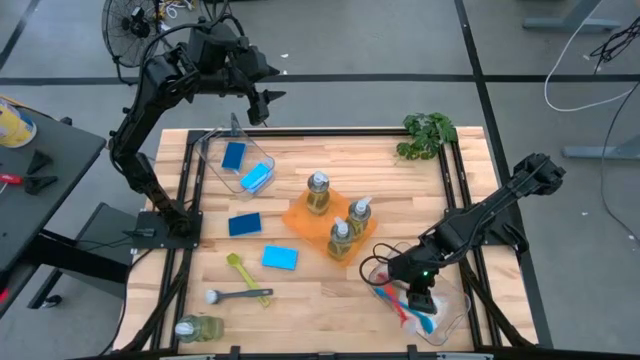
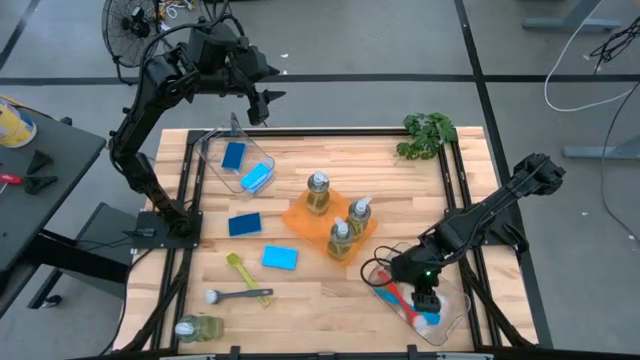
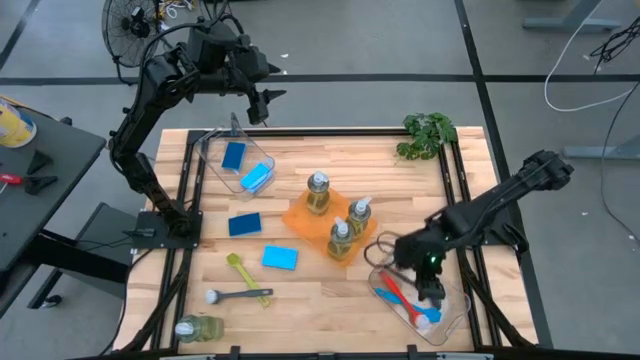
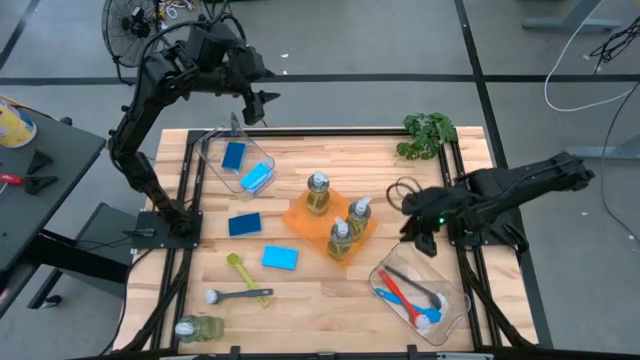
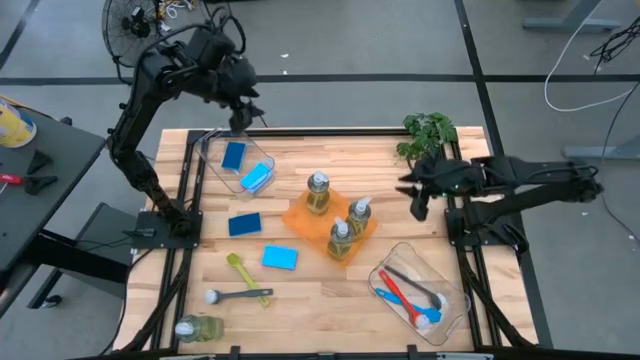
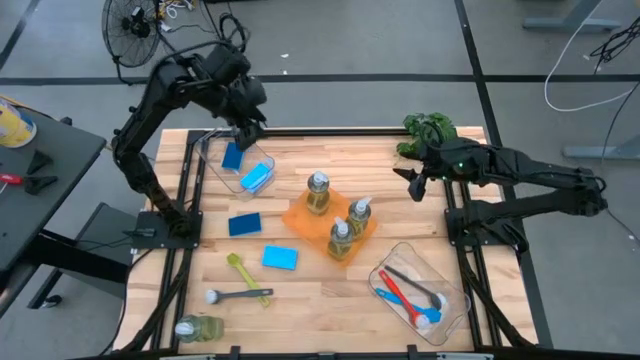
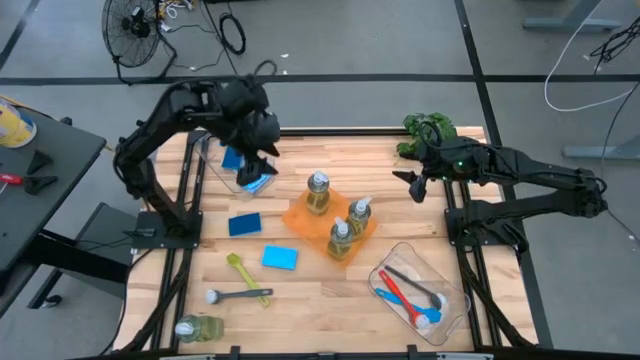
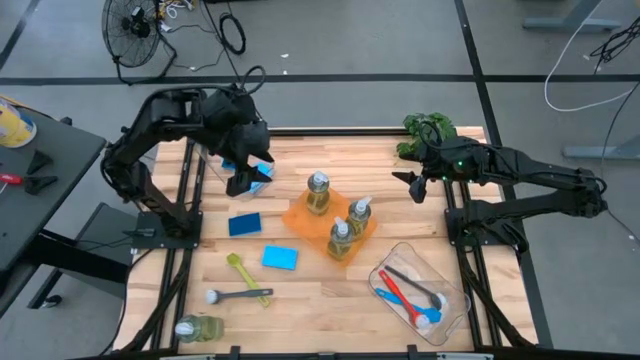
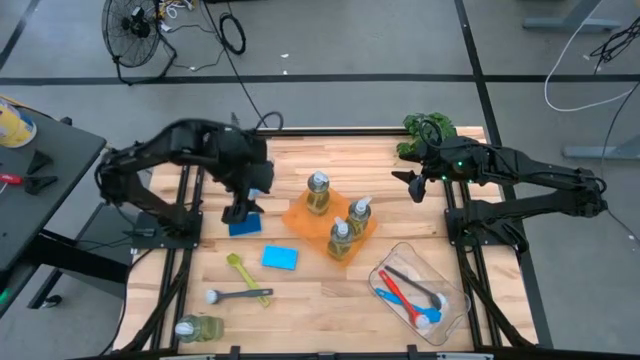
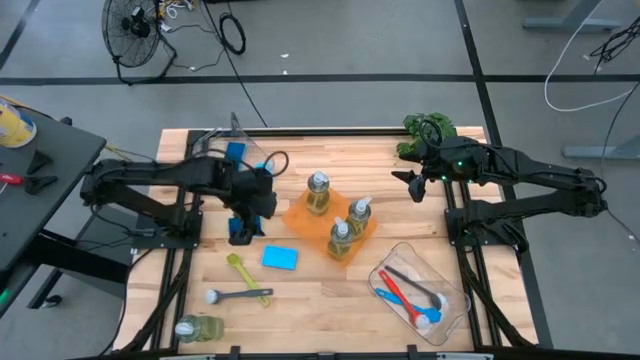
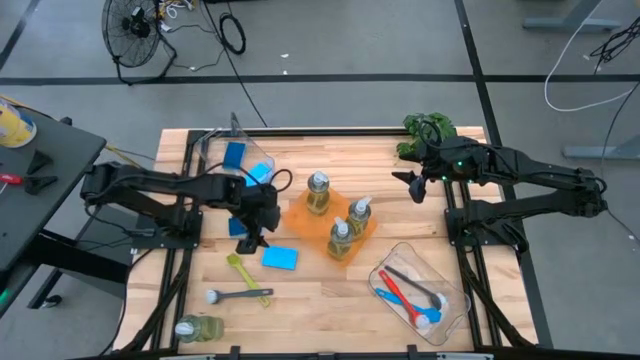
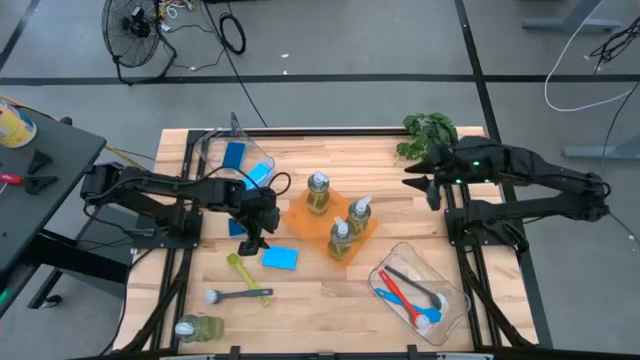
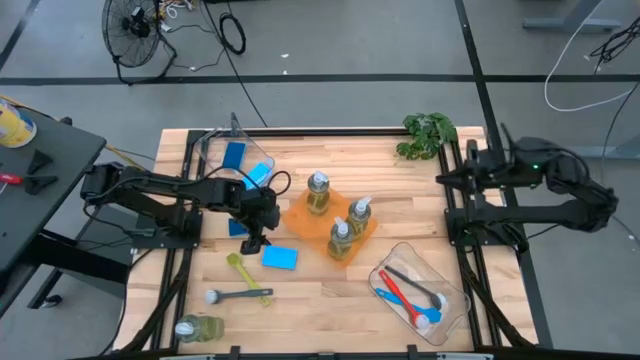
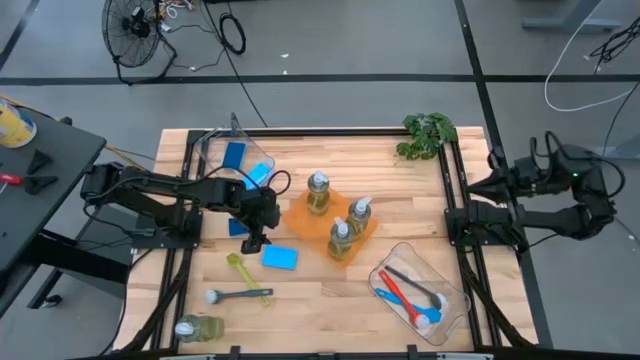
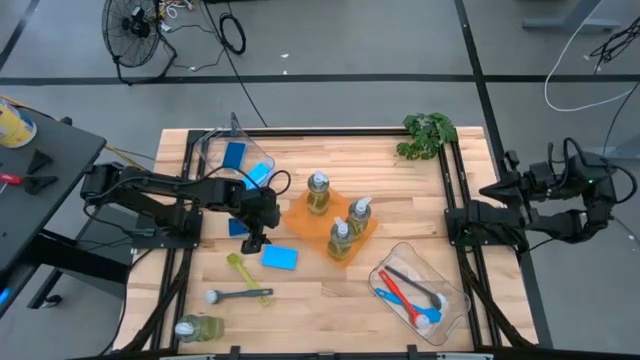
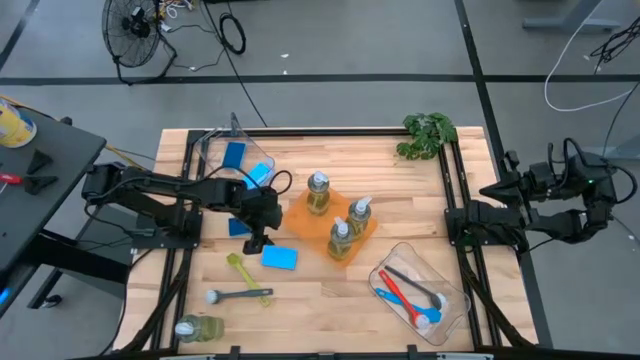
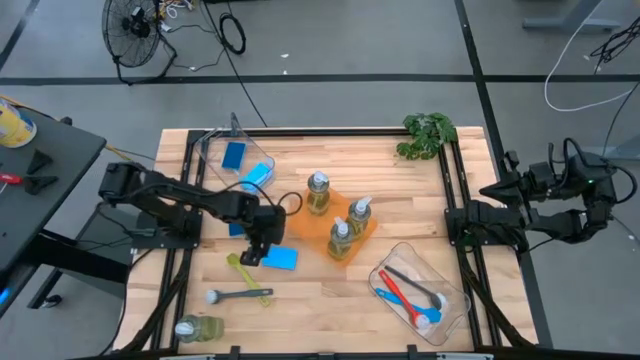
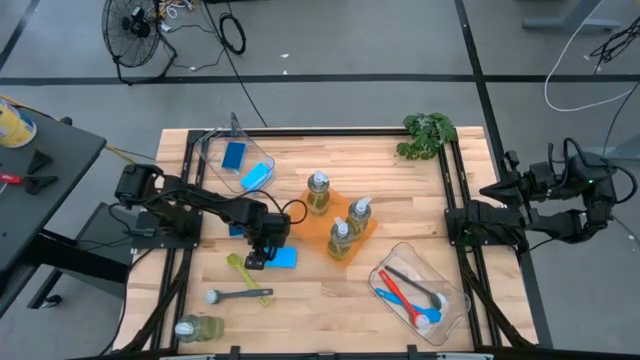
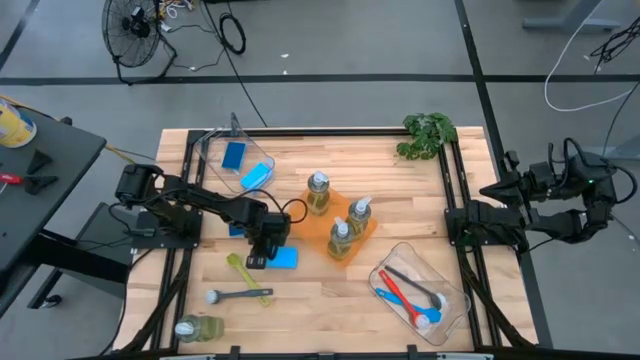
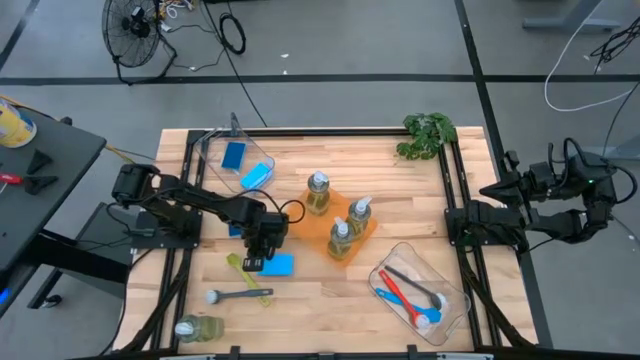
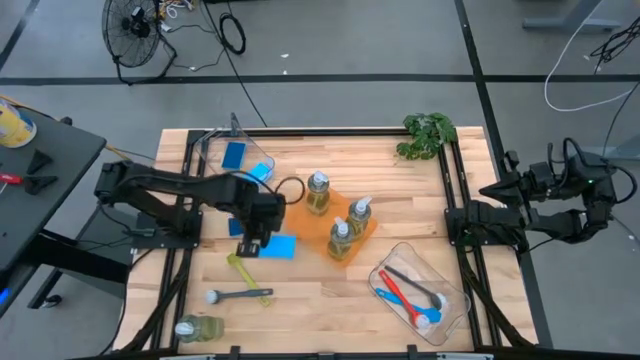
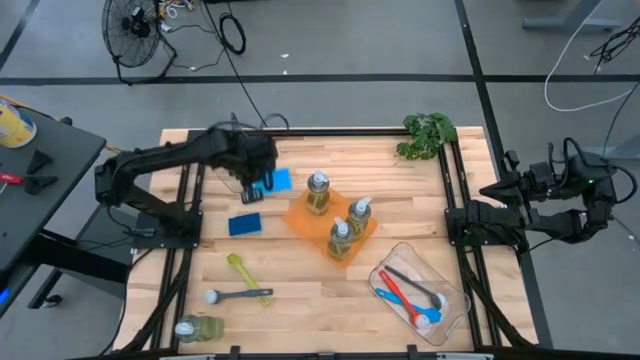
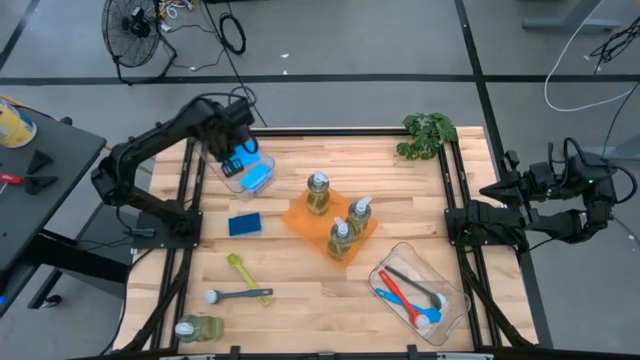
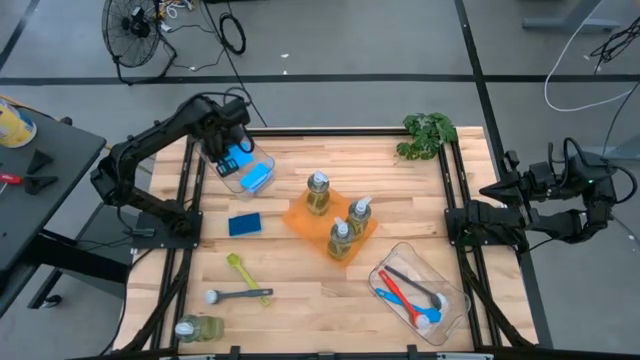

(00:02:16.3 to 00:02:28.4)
Task: Pick & Place Kitchen Sink Supplies
Put the blue sponge into the top transparent bin

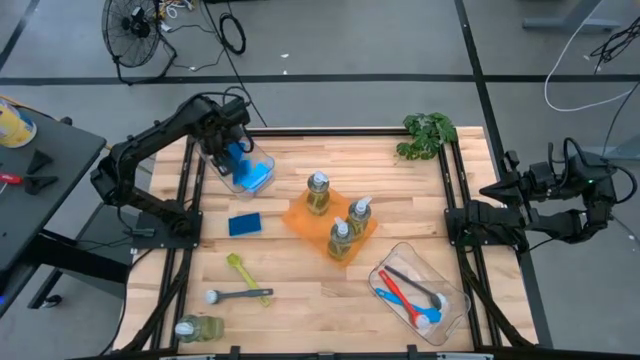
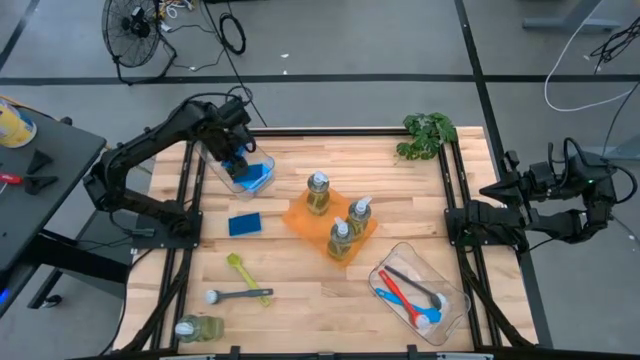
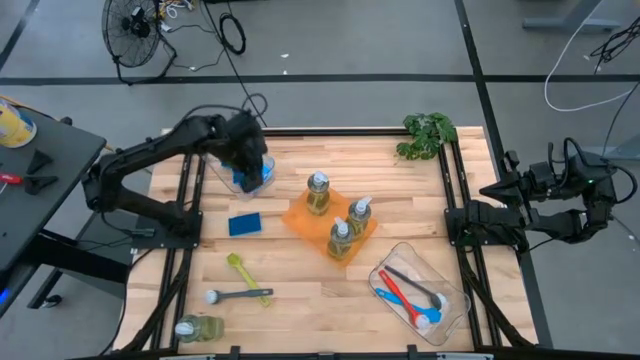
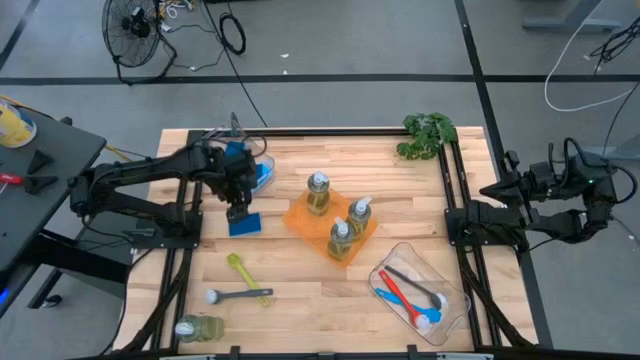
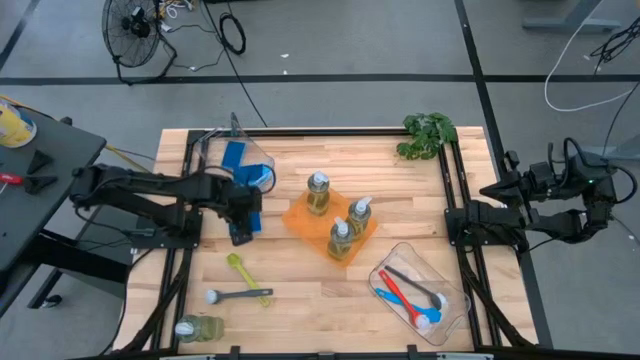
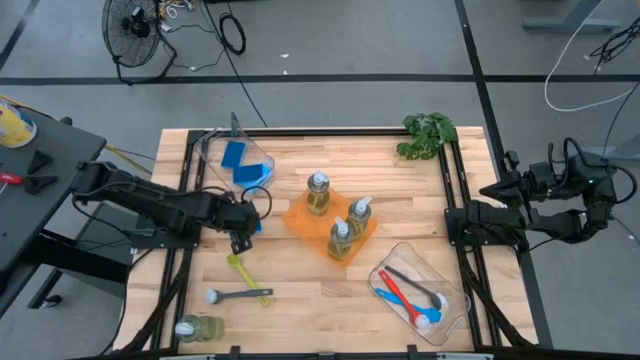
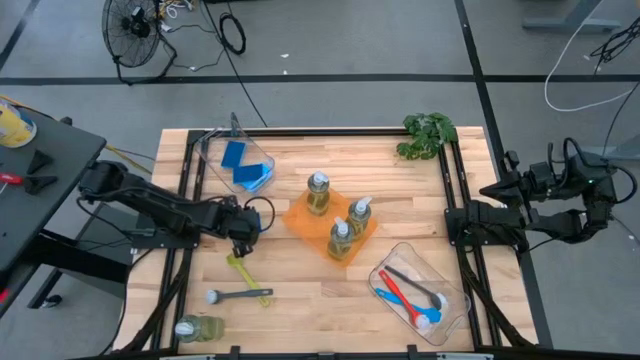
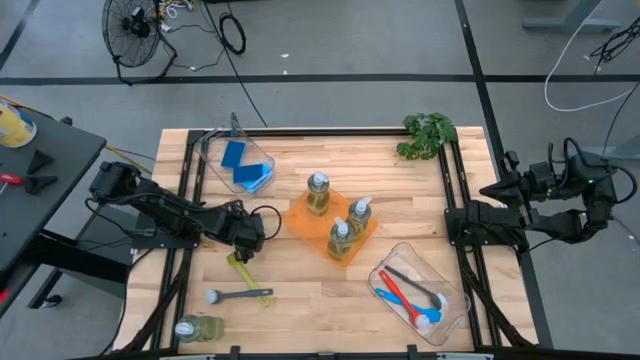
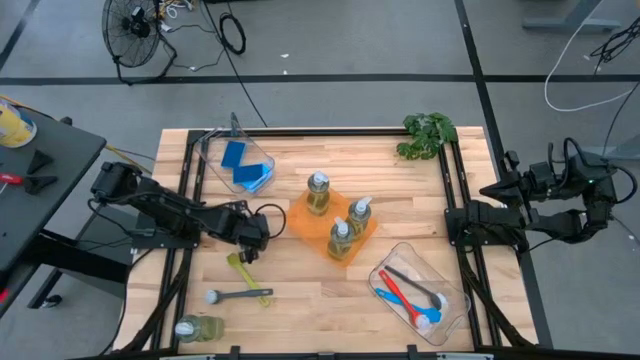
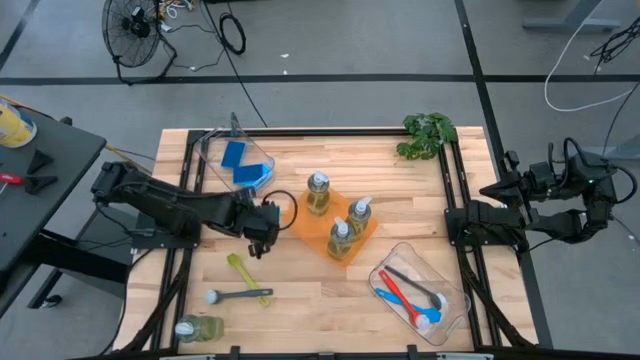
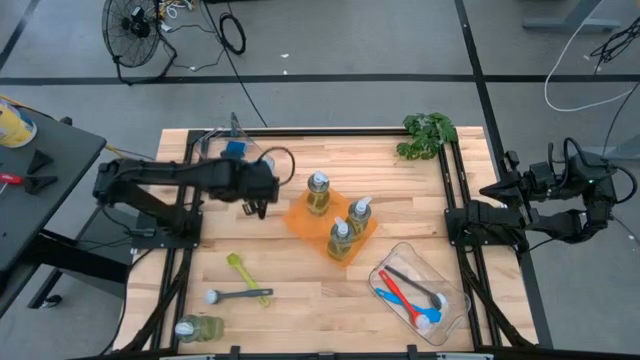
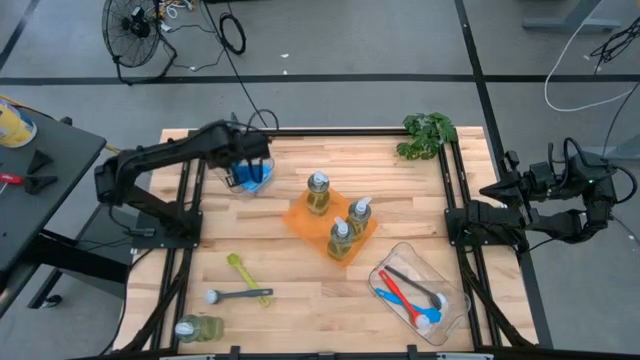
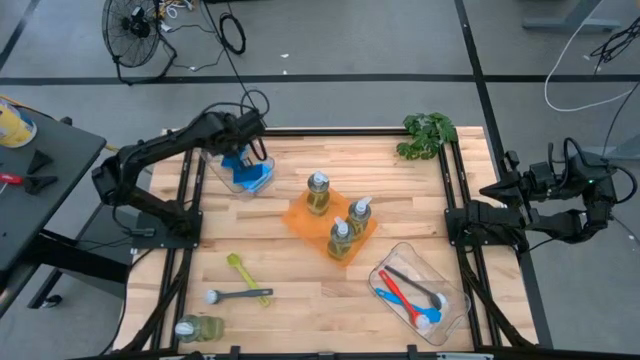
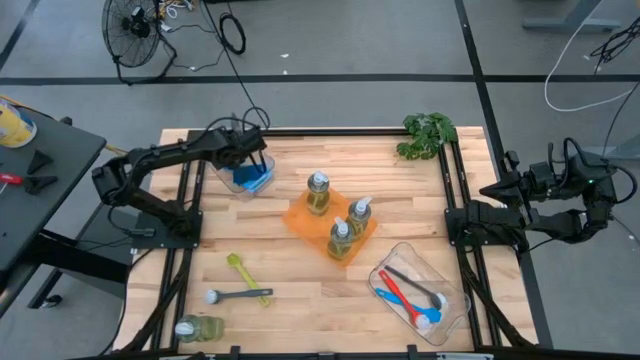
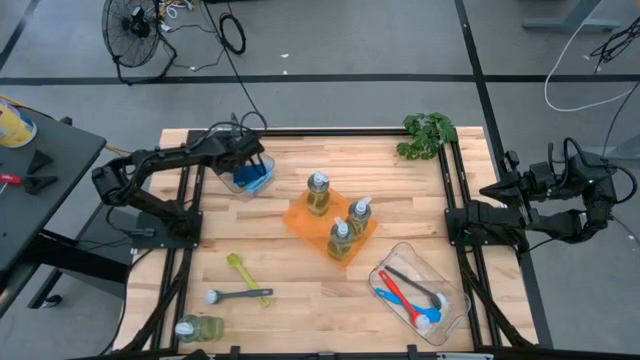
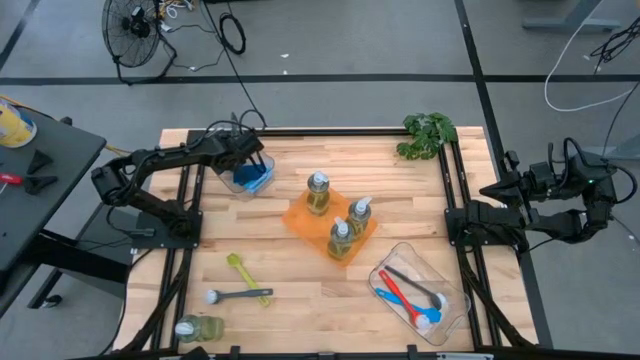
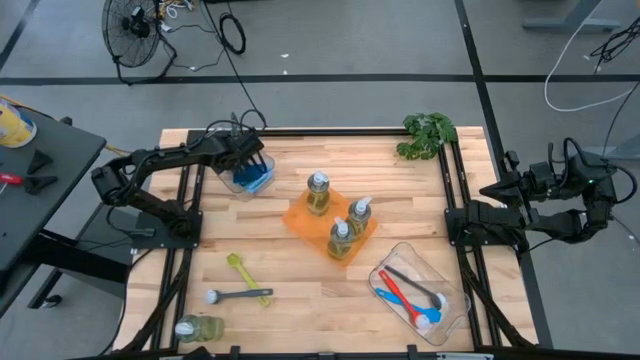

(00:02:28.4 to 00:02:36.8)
Put the blue sponge into the top transparent bin

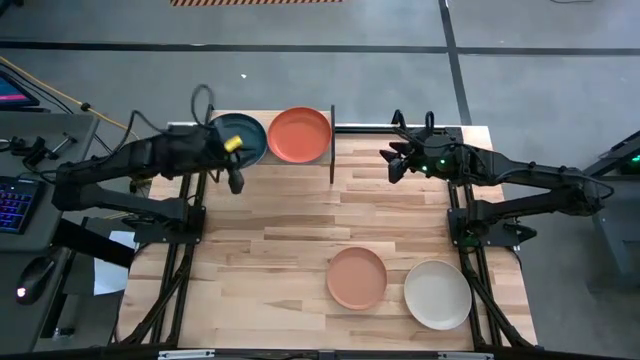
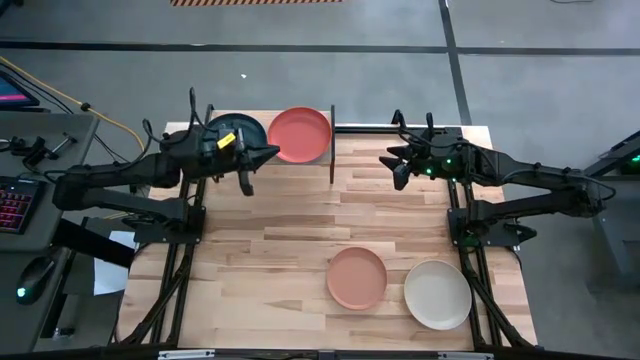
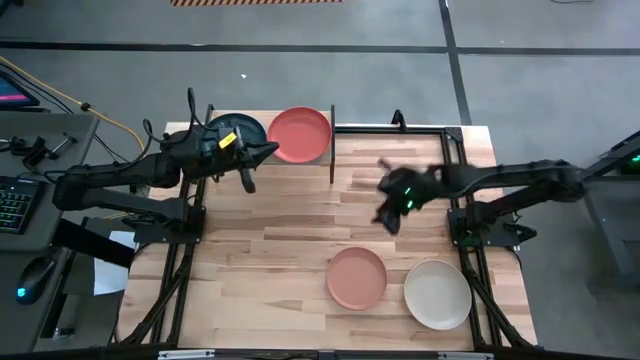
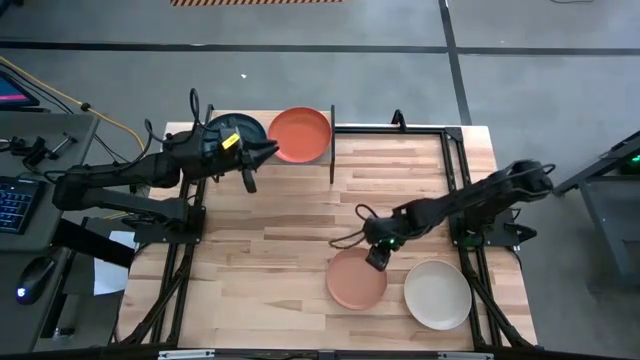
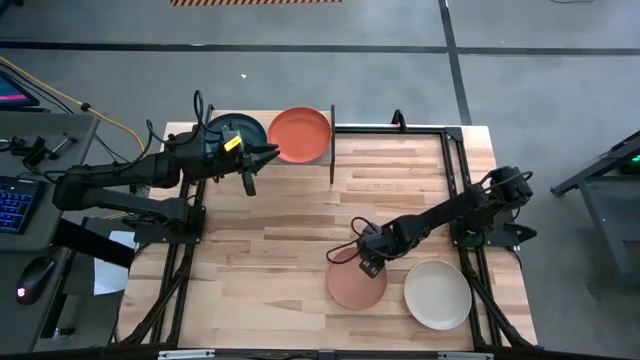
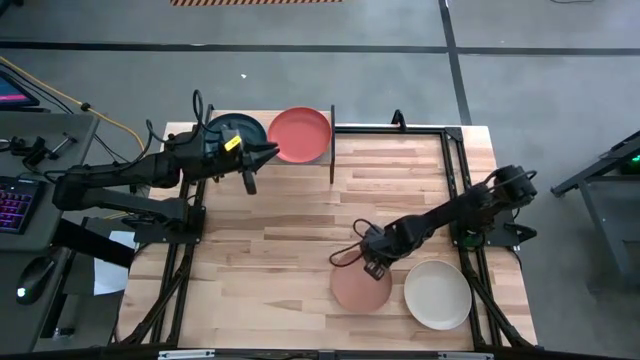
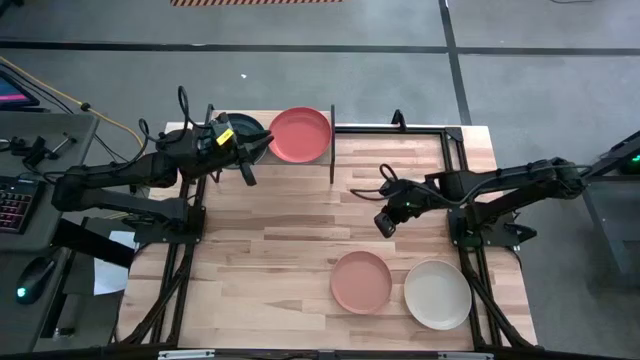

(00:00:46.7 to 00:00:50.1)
Task: Place and stack plates onto a shelf
Stack the light orange plate on top of the orange plate on the shelf
